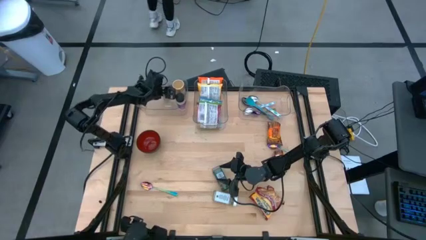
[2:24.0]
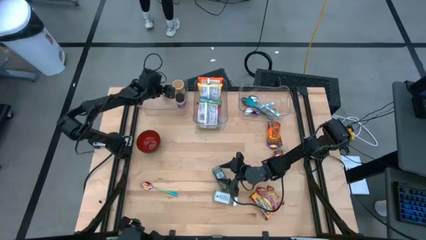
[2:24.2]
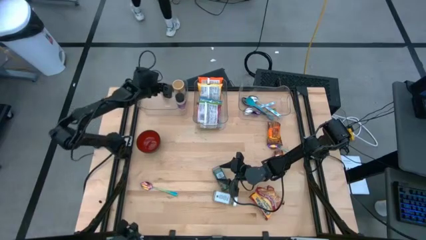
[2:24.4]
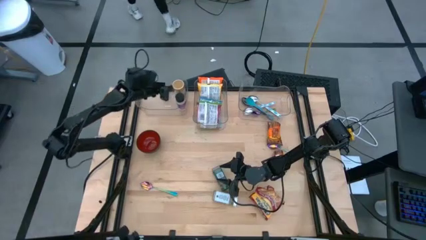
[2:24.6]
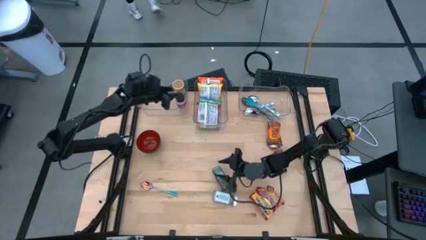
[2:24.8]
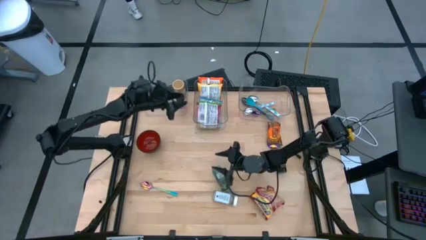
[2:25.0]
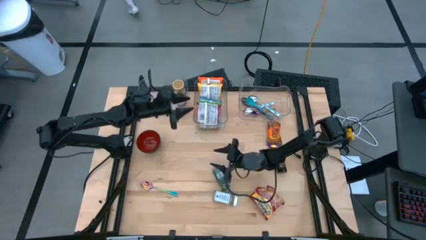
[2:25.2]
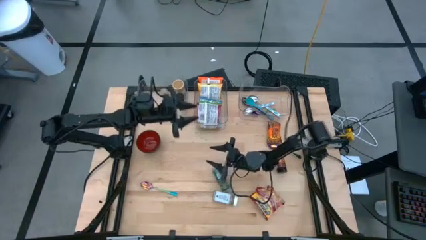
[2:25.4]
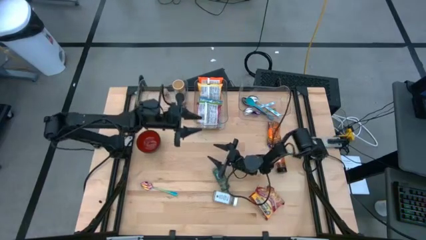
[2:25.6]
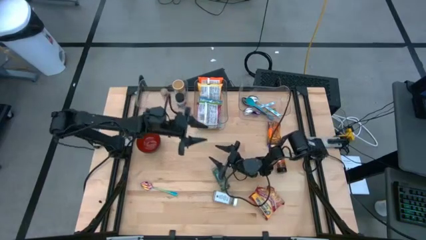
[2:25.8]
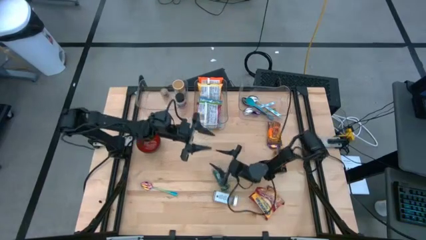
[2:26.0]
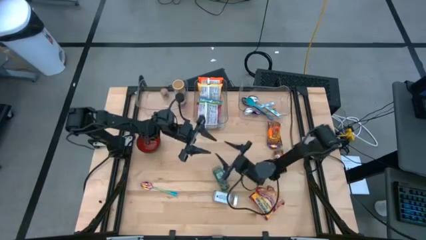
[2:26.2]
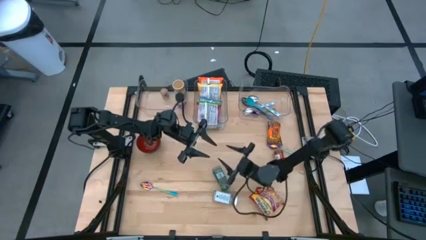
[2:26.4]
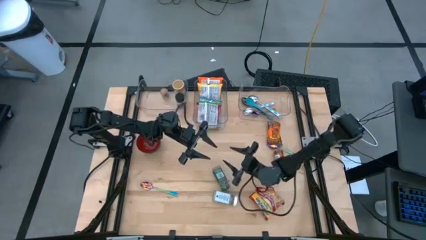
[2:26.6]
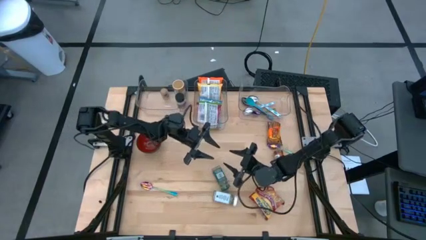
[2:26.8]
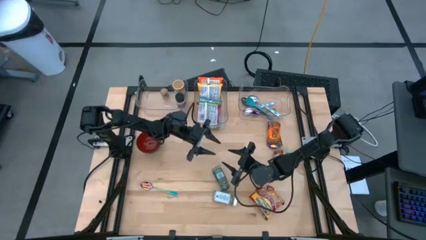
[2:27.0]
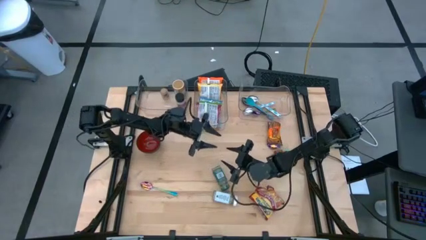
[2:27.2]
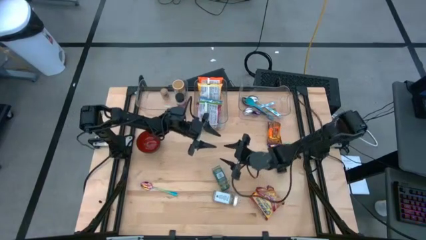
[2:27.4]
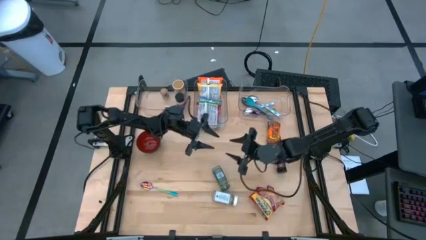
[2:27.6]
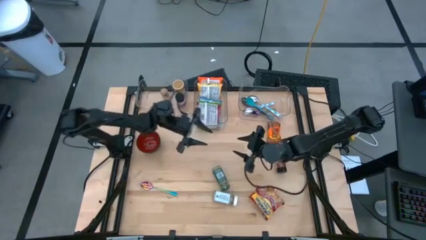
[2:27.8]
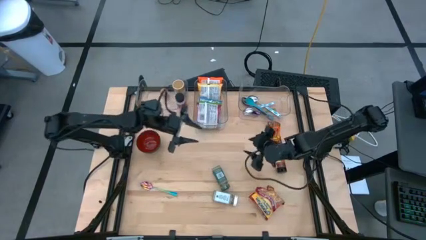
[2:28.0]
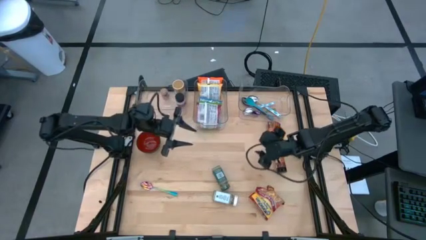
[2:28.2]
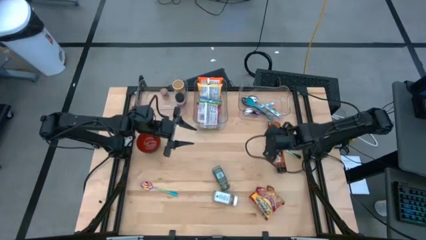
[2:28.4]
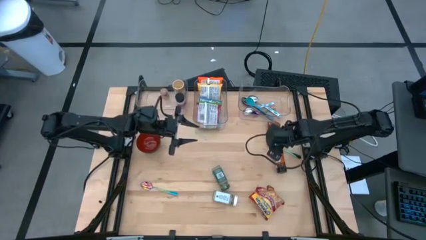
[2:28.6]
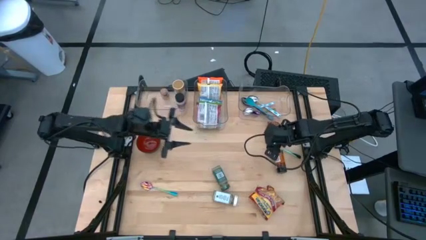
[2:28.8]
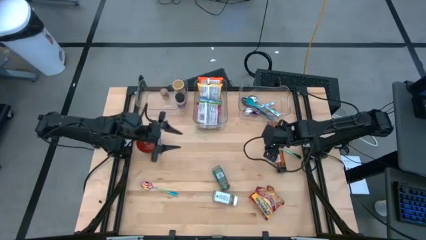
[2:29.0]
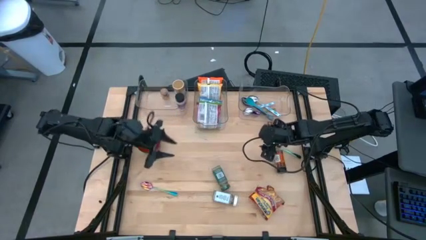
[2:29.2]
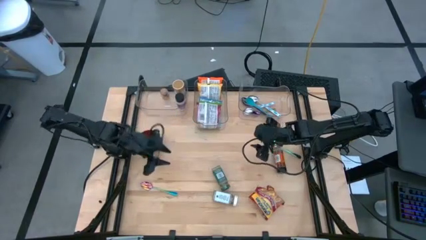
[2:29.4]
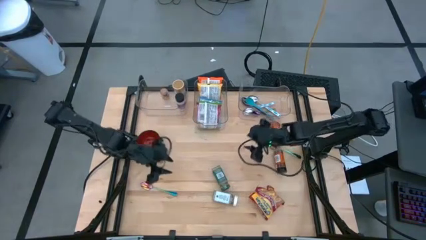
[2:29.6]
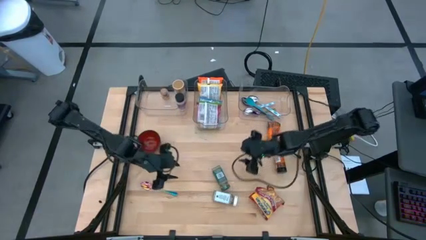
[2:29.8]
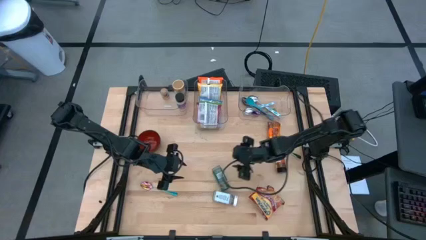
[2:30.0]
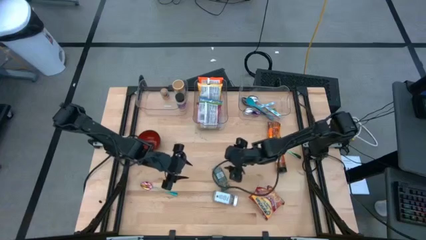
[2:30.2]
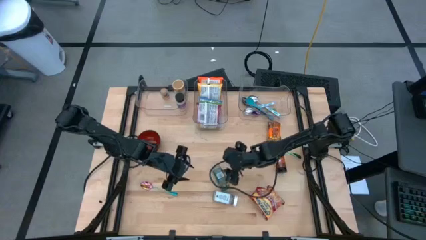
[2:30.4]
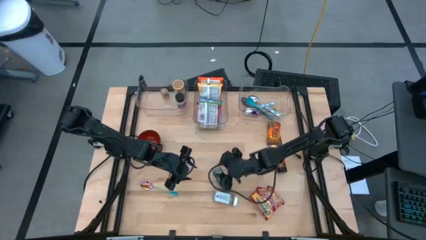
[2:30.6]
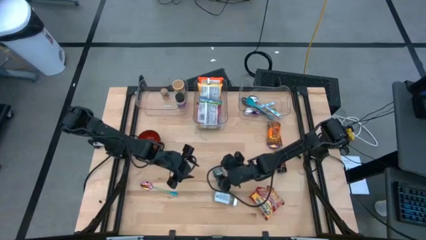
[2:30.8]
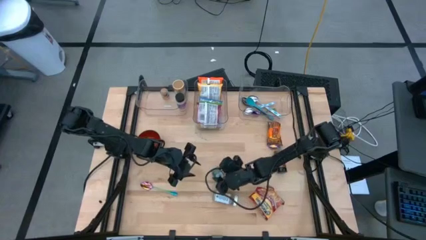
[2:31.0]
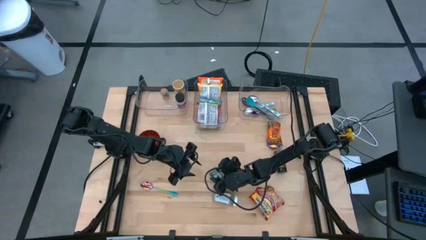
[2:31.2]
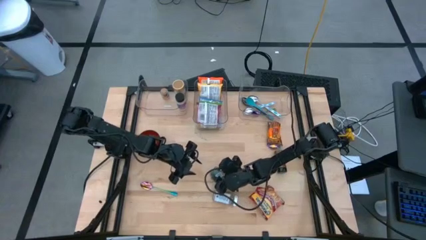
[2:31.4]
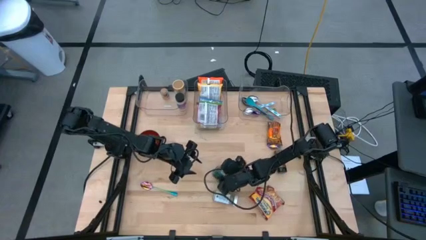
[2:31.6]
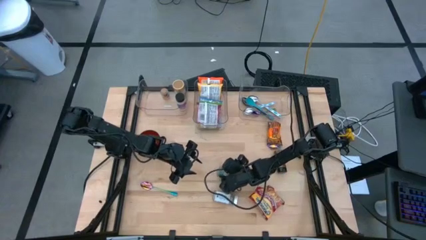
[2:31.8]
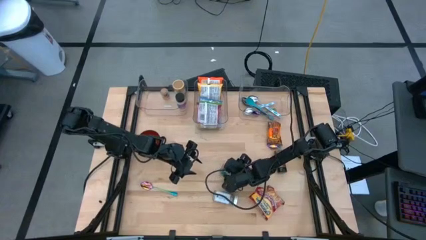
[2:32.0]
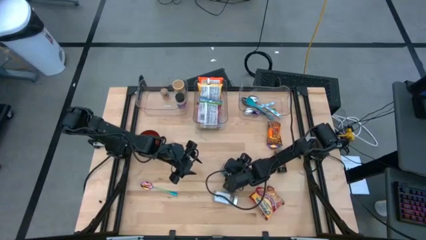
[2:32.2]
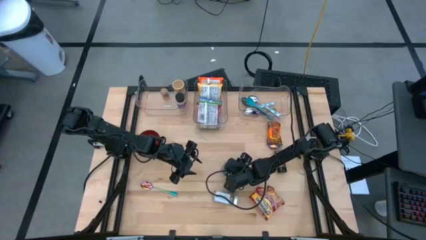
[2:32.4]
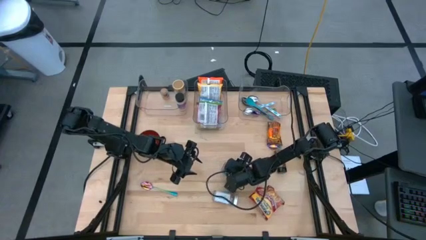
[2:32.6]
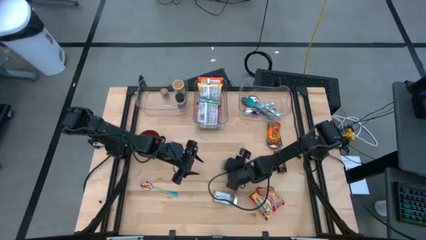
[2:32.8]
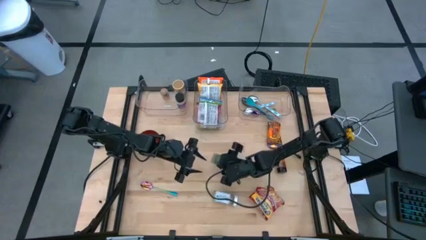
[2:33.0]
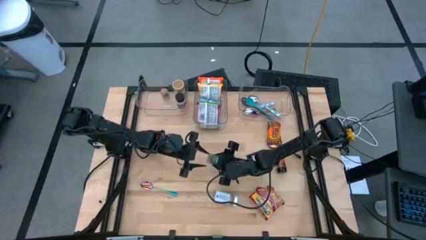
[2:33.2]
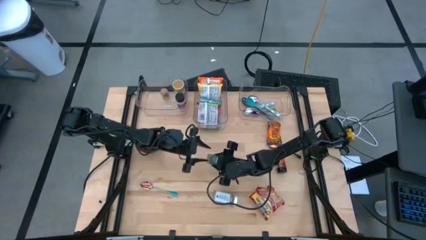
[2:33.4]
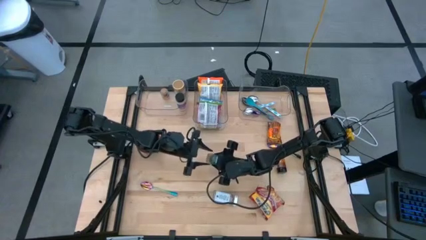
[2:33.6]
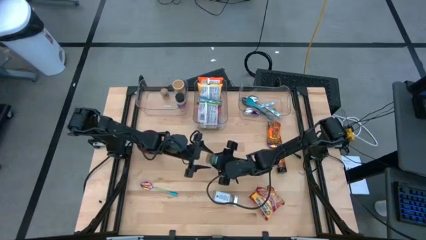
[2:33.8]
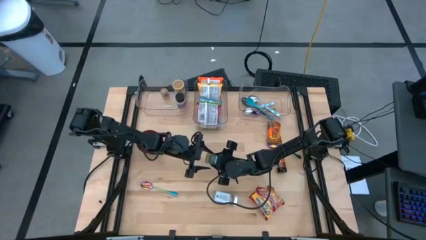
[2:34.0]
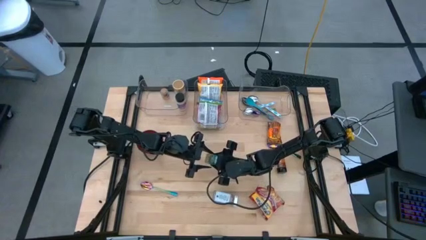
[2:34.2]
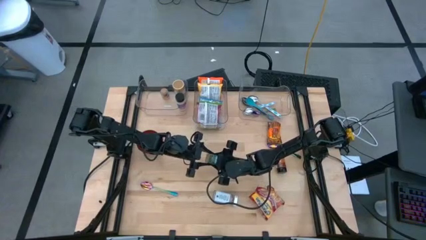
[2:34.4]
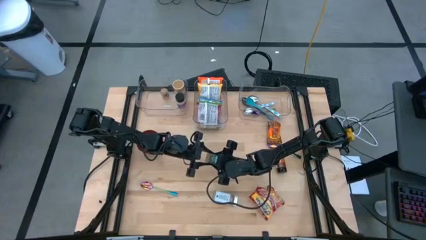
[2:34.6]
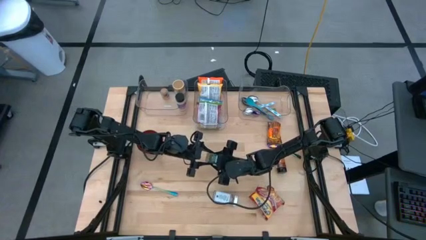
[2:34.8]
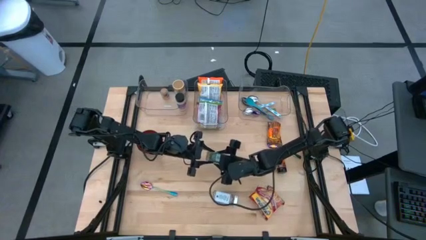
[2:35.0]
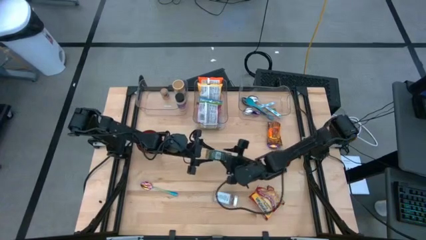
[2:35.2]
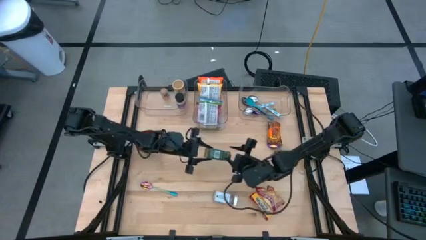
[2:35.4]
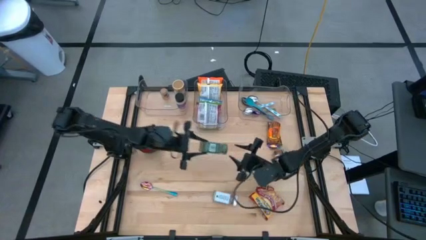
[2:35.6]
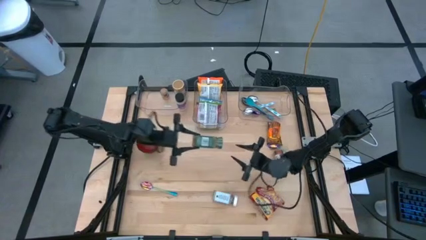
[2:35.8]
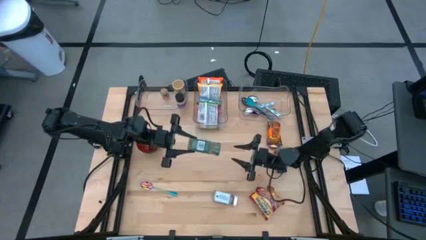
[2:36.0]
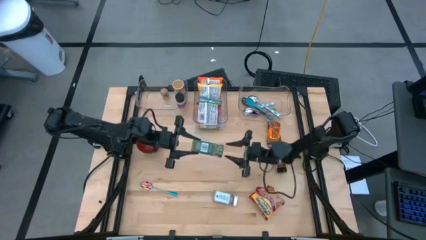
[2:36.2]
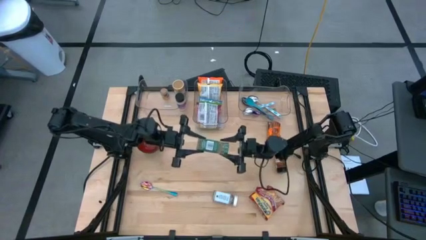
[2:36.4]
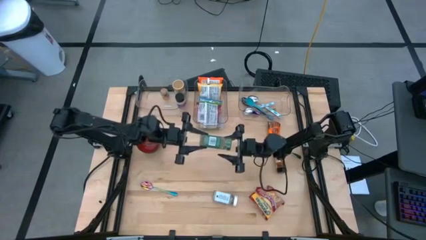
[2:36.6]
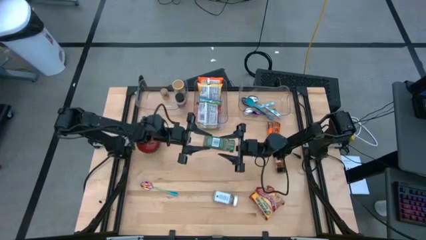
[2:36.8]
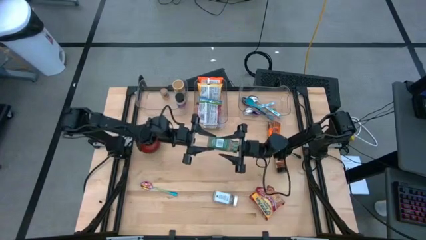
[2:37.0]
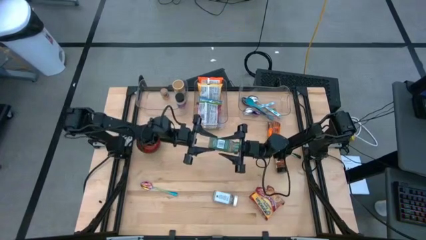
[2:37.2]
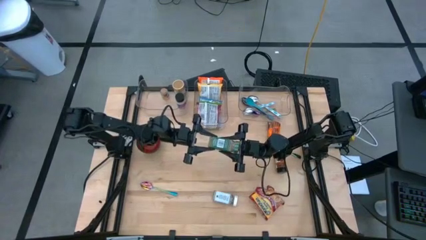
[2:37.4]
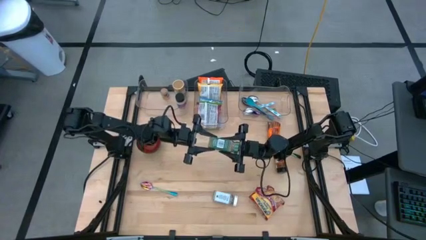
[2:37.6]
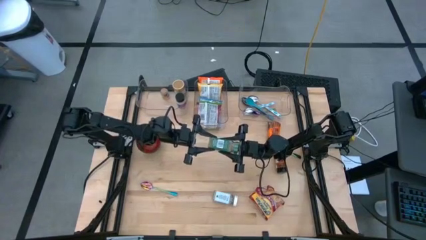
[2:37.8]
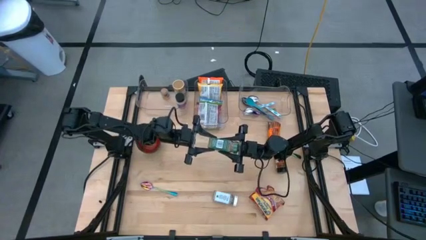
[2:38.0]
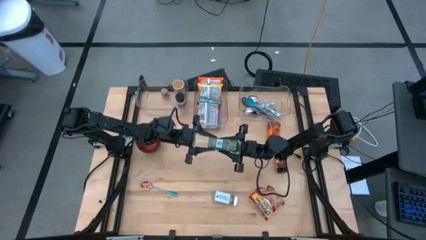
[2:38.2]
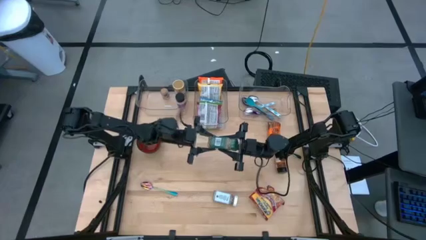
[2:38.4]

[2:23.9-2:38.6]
Task: Pick & Place Food Item
Put the green seasoning bottle into the left transparent bin

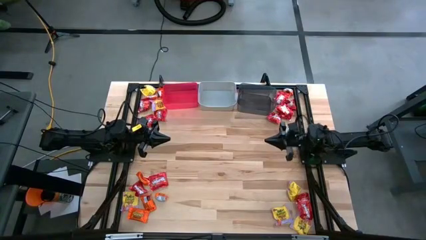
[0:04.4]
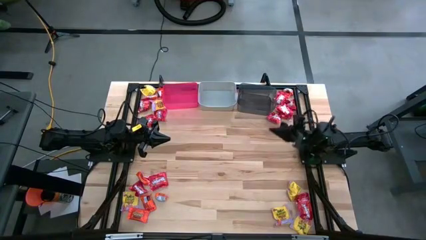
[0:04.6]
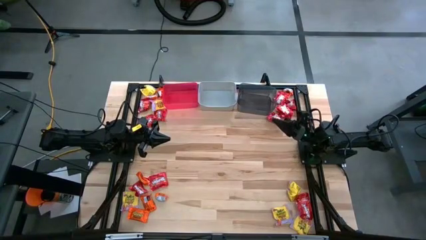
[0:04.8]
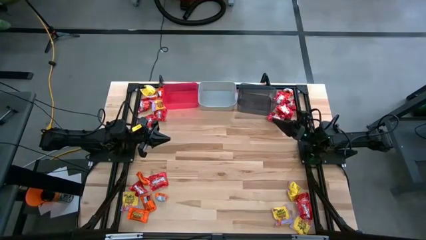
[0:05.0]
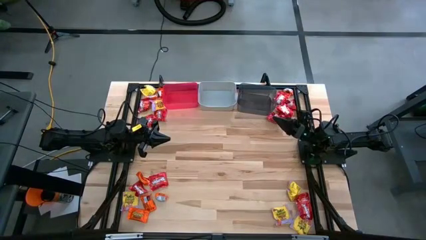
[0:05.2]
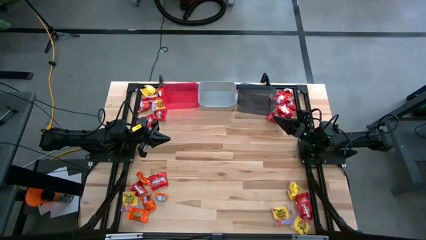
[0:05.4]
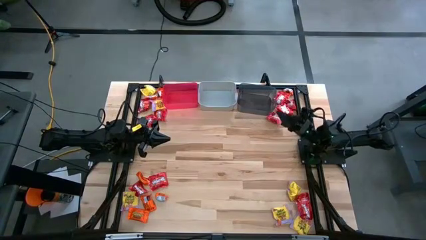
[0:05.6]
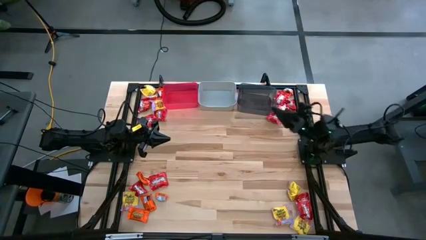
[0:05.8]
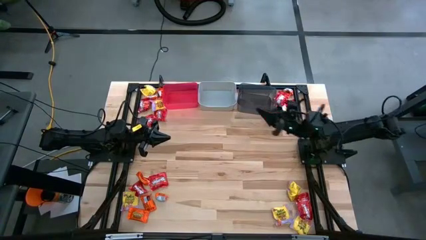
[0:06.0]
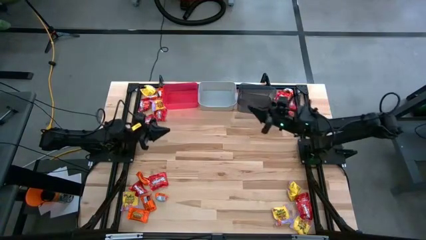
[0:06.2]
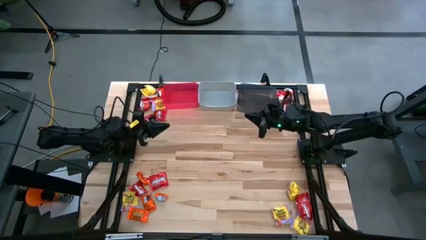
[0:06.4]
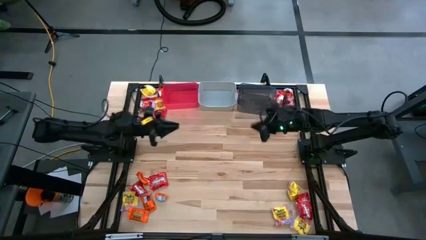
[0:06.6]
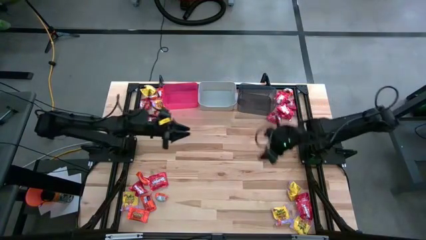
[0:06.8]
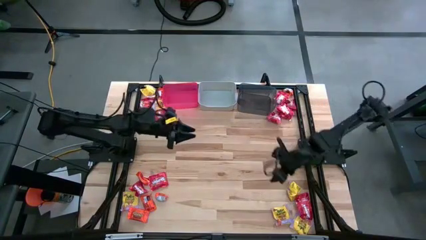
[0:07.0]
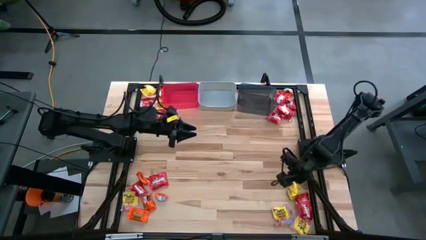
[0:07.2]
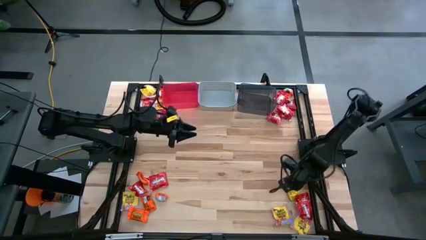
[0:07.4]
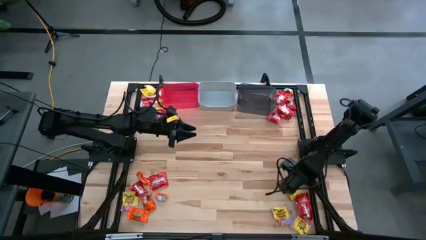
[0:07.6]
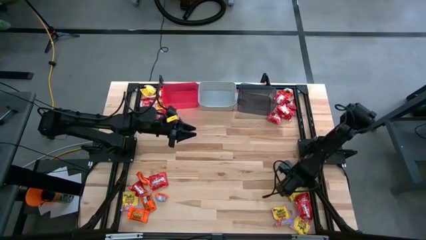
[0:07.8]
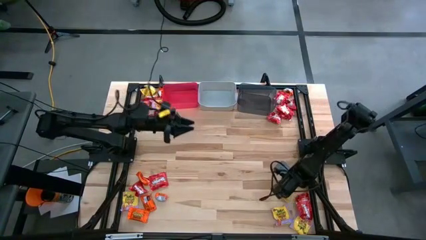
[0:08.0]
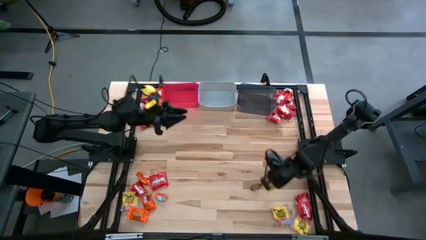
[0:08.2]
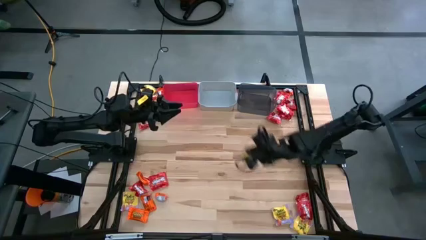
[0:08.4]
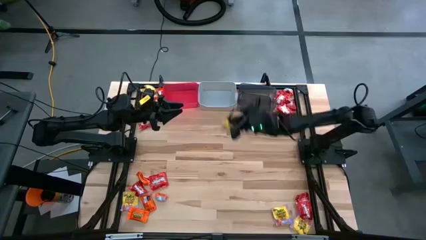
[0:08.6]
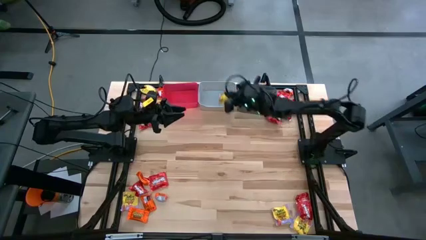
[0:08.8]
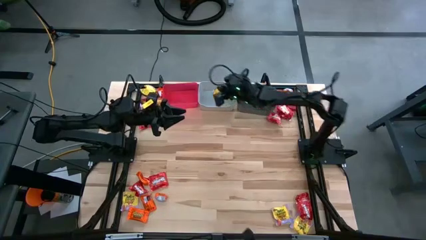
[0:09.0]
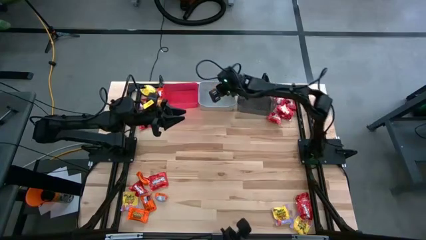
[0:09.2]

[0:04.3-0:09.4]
Task: Sort candy
Put the yellow candy into the gray bin
